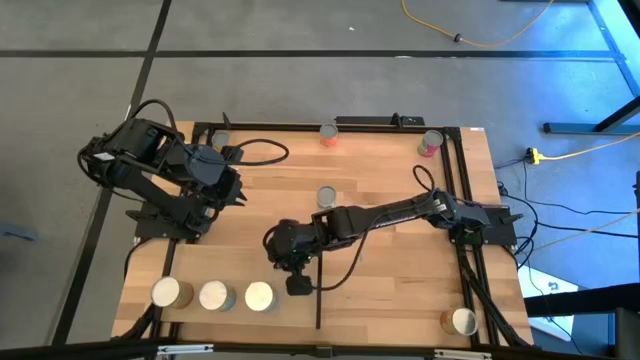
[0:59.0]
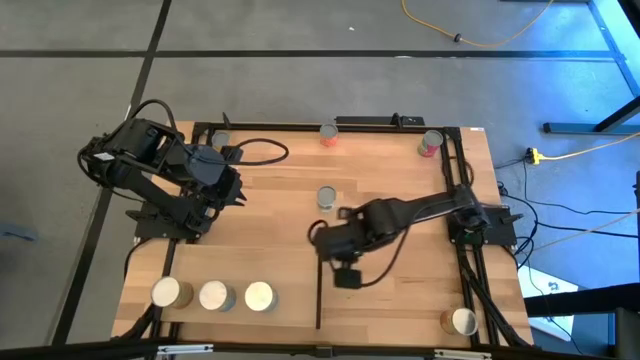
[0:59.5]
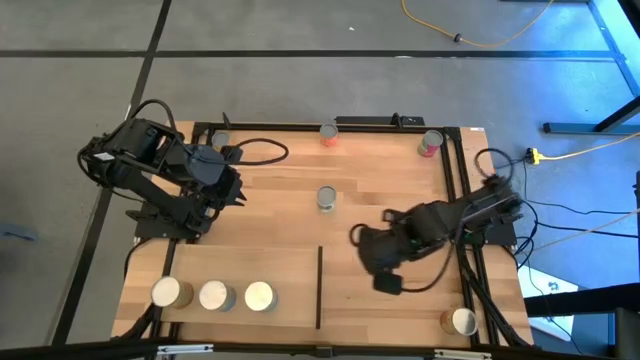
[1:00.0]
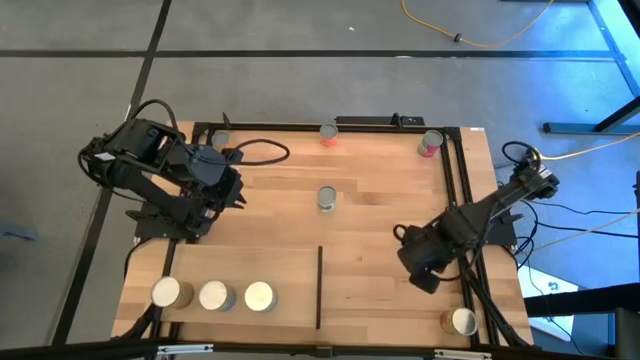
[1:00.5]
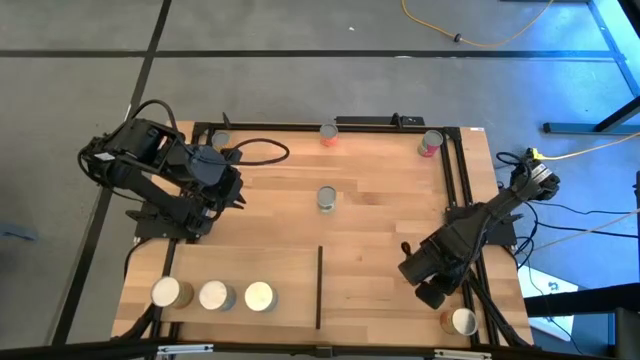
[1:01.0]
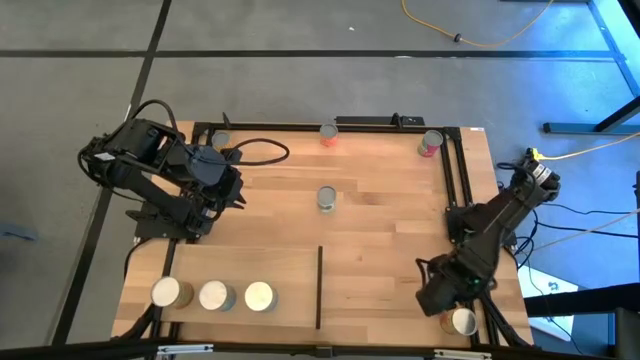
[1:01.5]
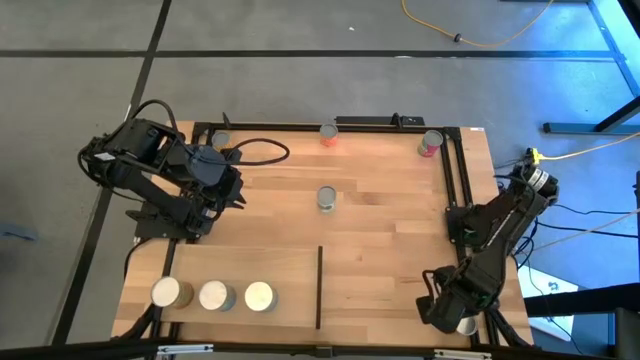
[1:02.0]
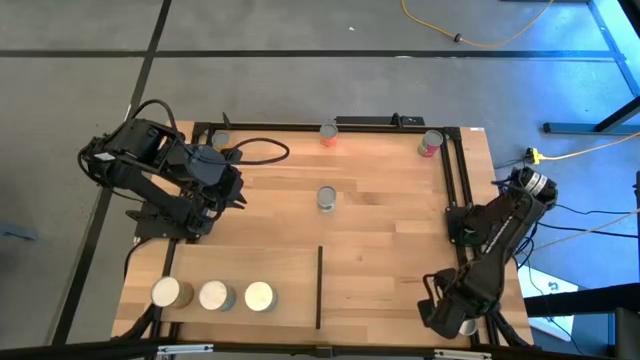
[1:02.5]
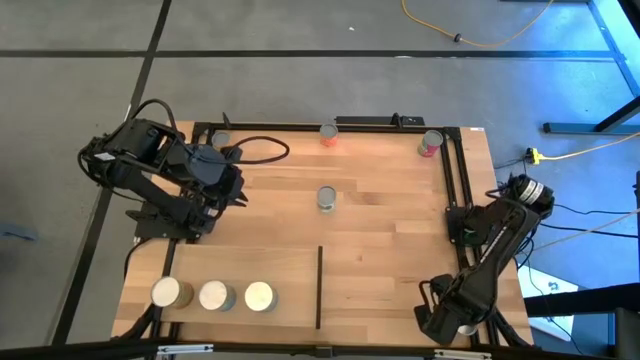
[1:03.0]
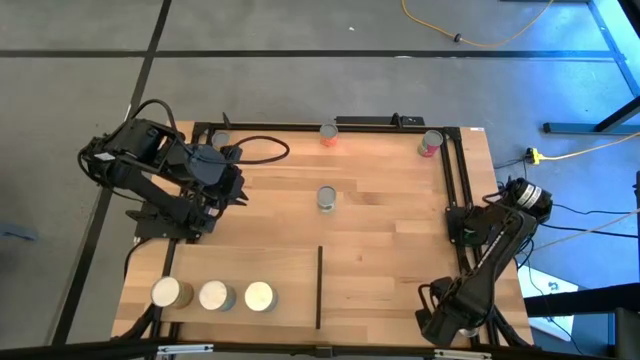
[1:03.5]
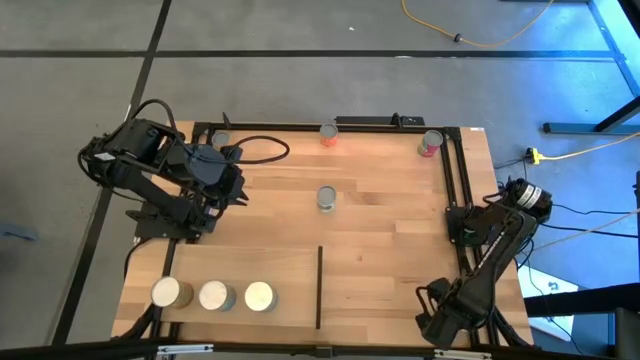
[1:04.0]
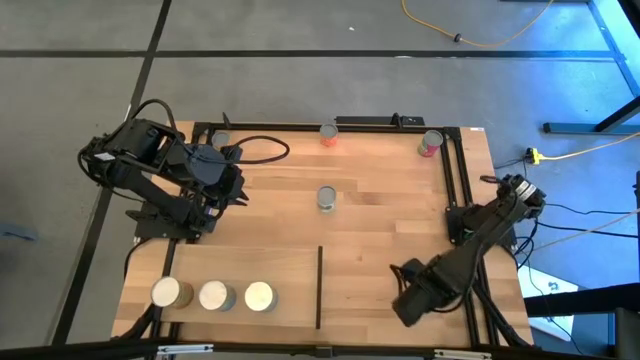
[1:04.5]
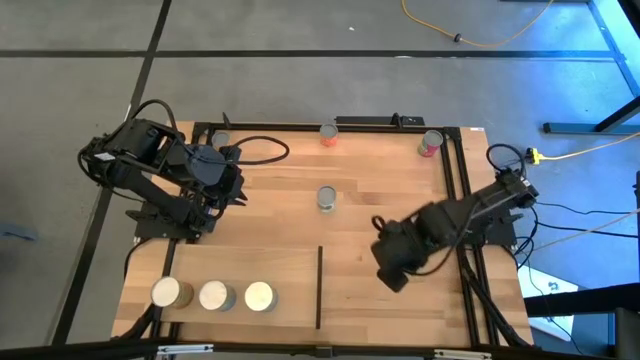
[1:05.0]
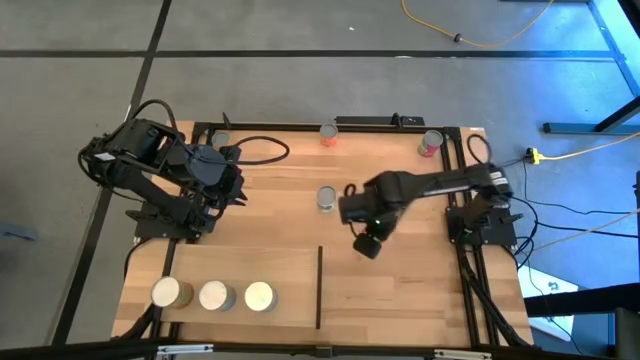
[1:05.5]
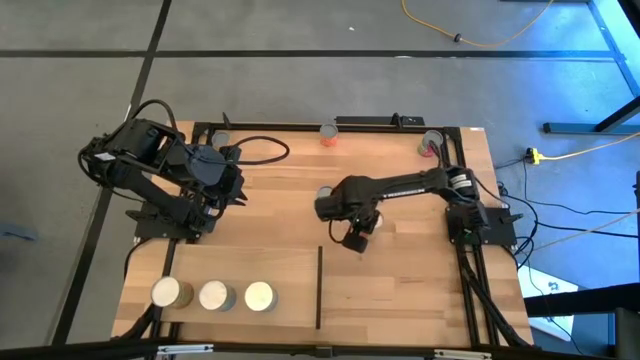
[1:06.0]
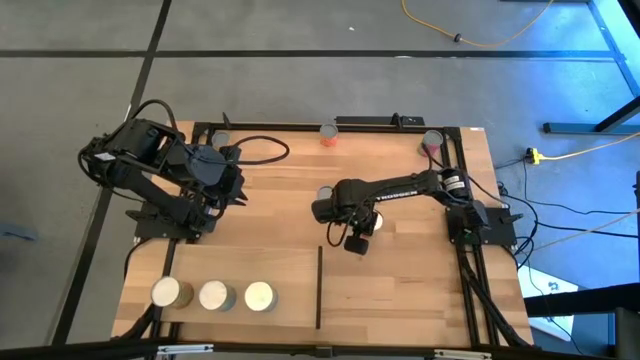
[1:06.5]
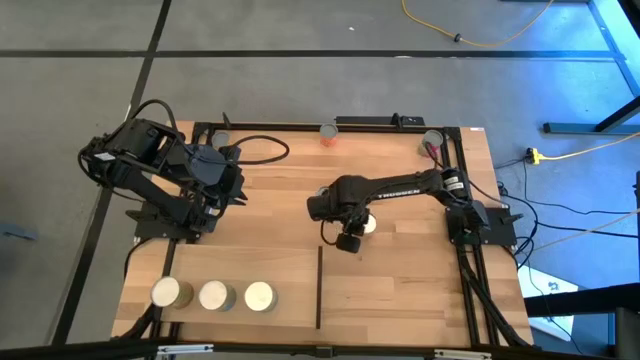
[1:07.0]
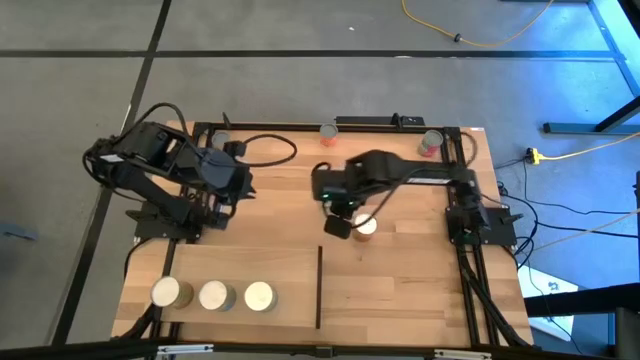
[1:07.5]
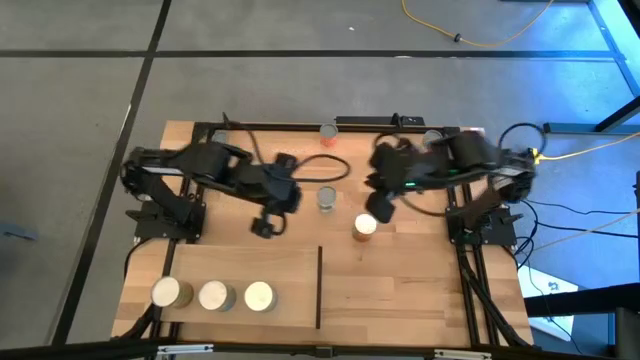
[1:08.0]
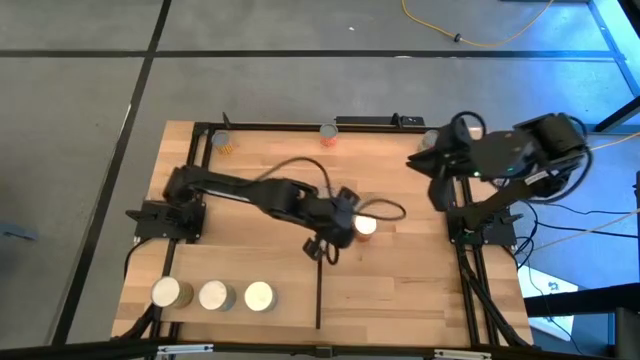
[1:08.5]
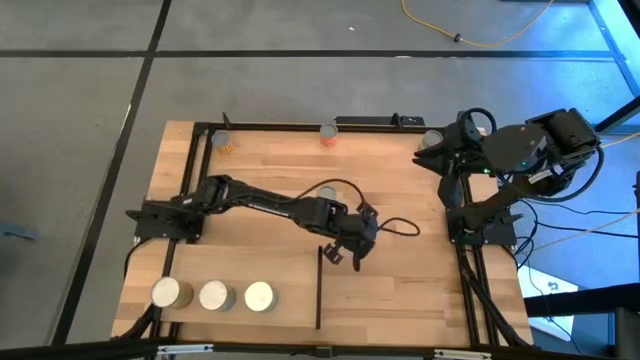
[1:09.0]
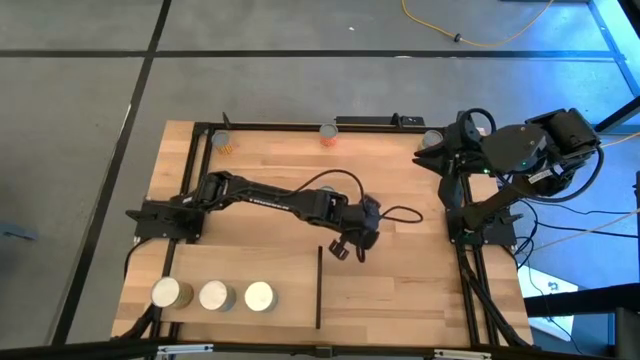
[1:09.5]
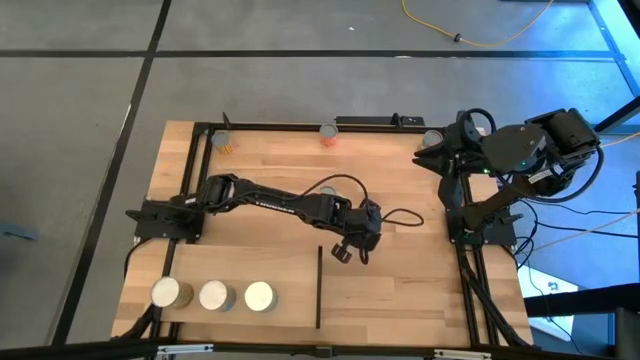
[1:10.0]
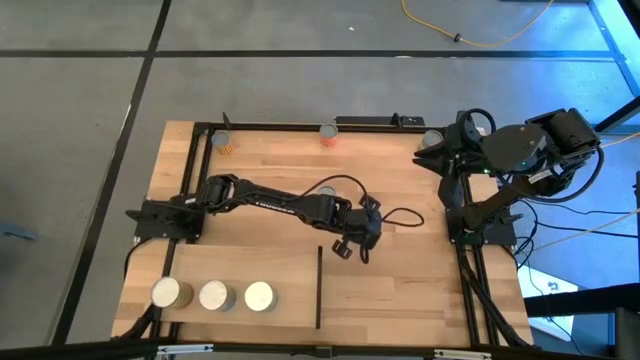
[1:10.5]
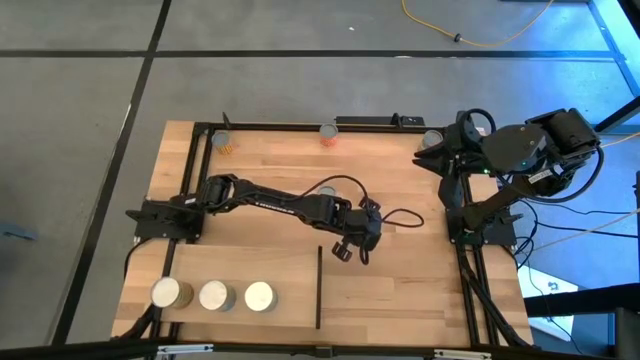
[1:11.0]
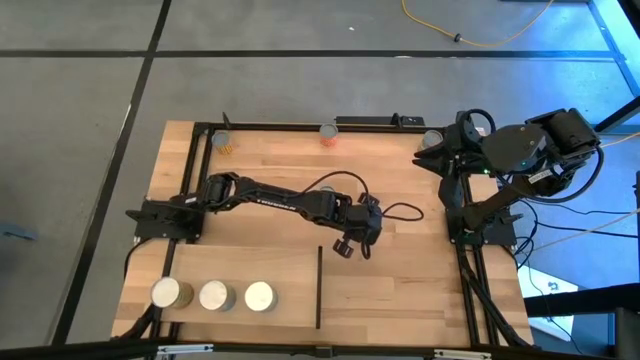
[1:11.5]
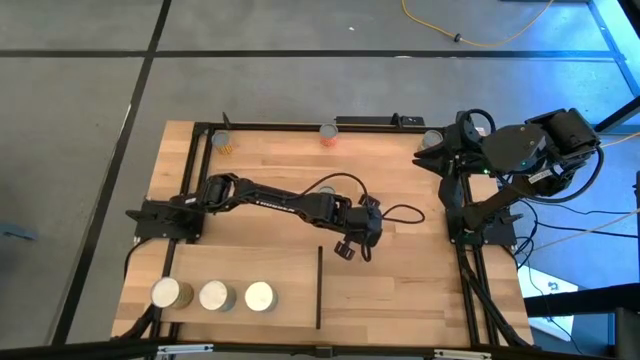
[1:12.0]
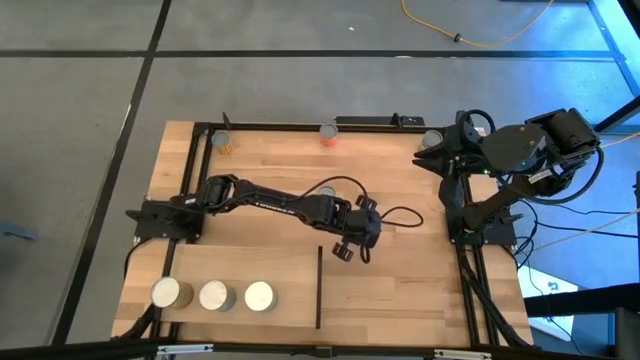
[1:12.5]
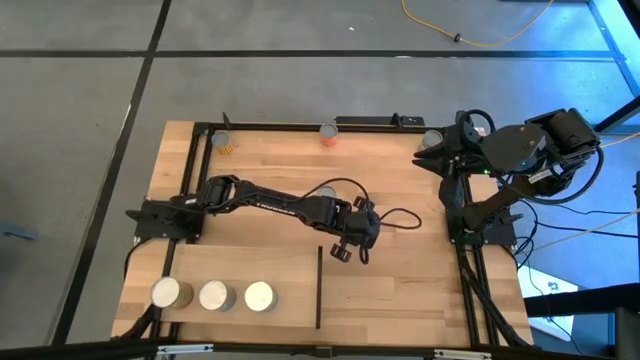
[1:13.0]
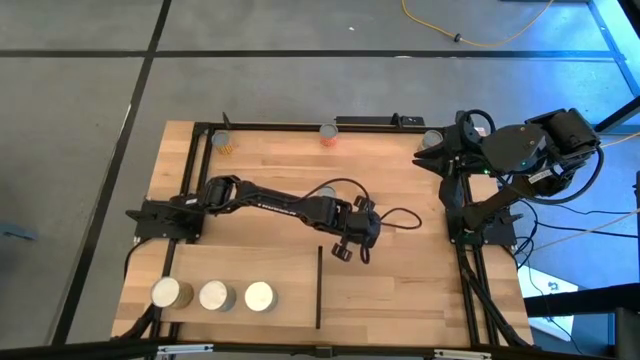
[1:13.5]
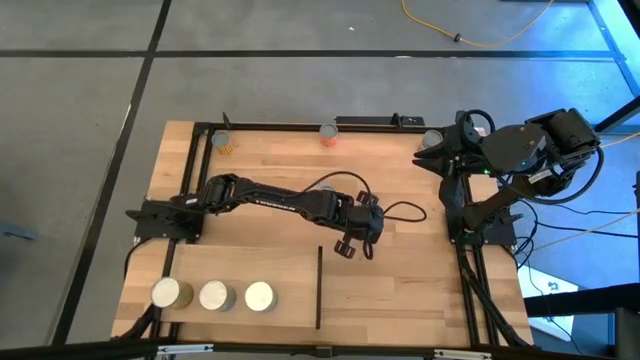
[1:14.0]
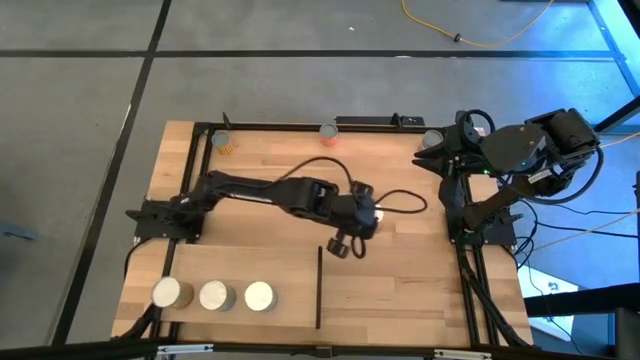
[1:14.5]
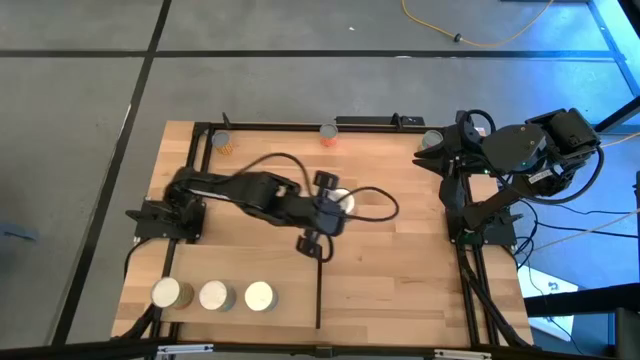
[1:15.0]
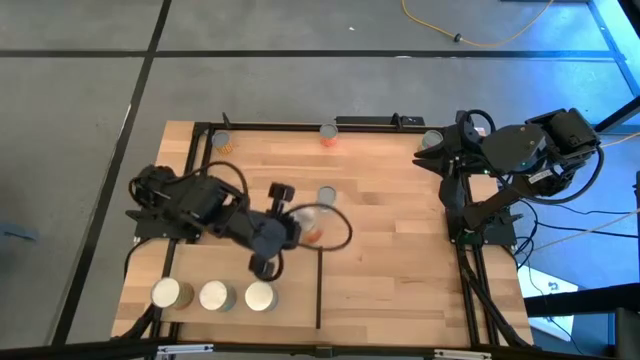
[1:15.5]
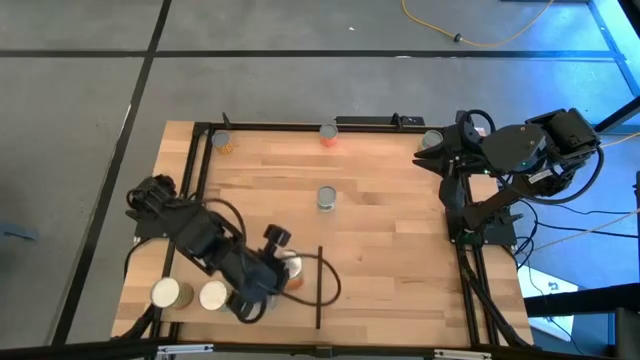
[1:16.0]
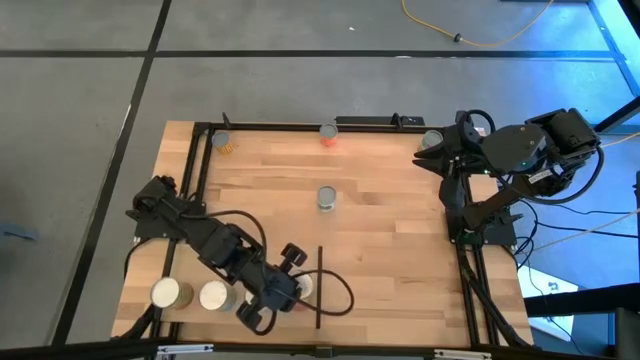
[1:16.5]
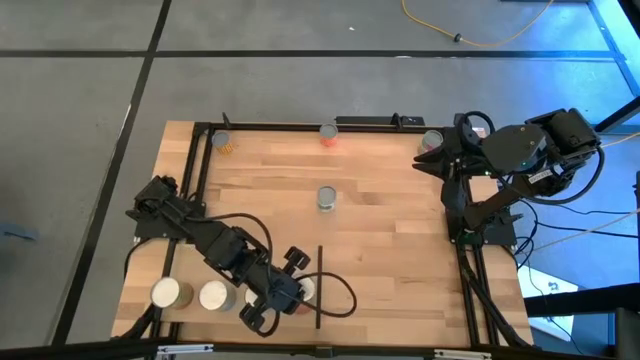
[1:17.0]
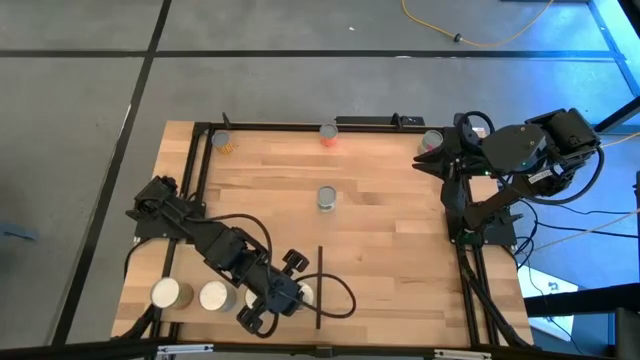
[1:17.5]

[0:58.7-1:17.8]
Task: Pick and place cans onto a shelf
Put the canned pineapple on the shelf

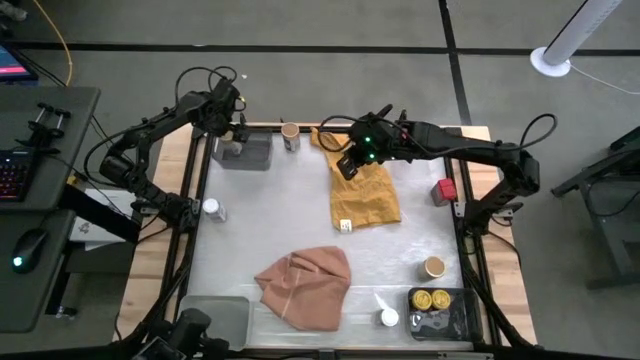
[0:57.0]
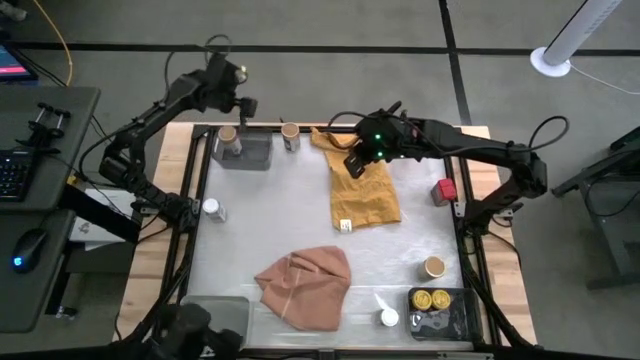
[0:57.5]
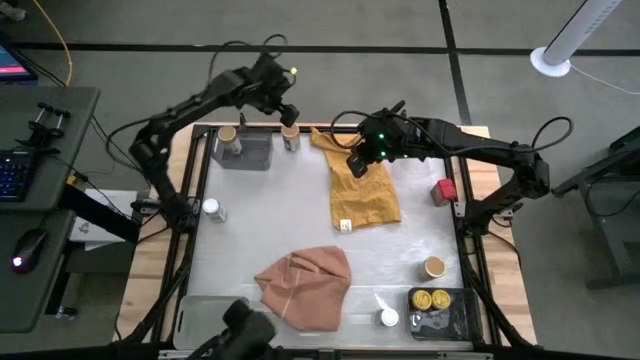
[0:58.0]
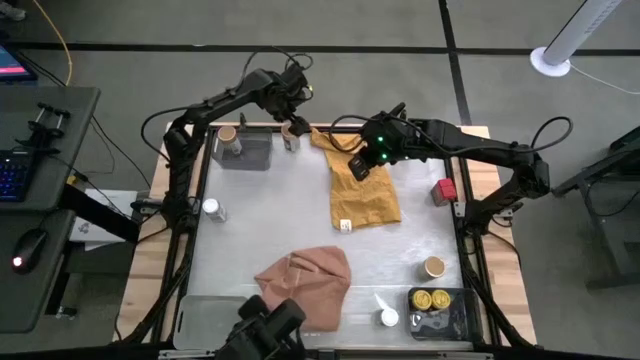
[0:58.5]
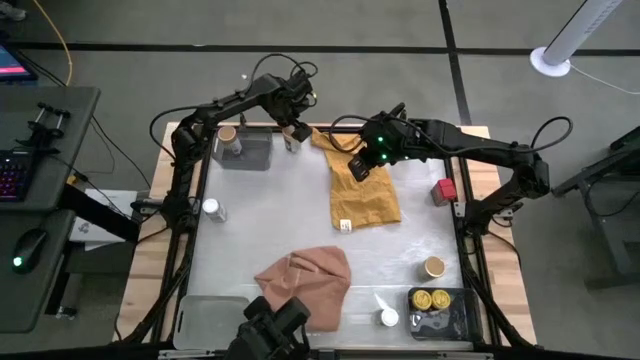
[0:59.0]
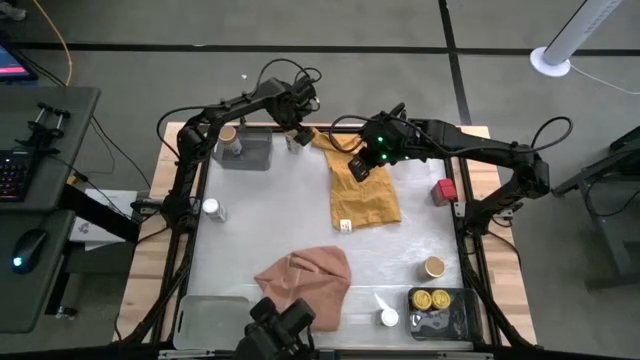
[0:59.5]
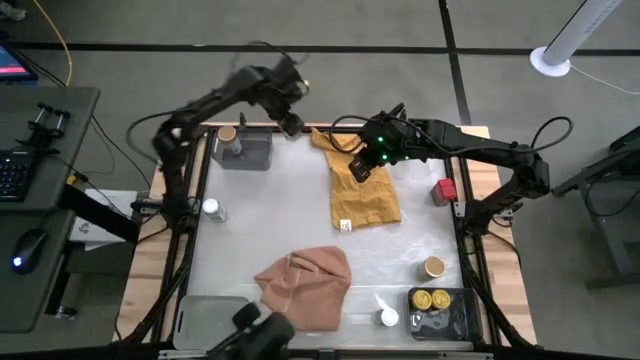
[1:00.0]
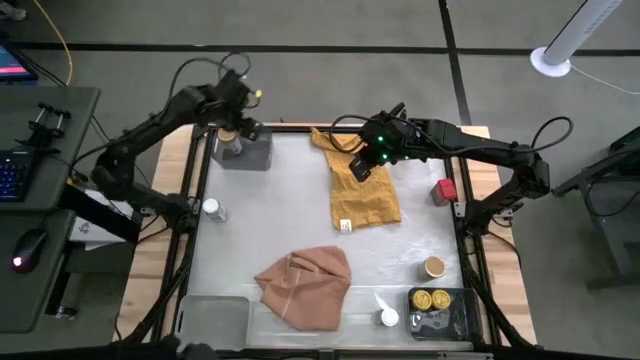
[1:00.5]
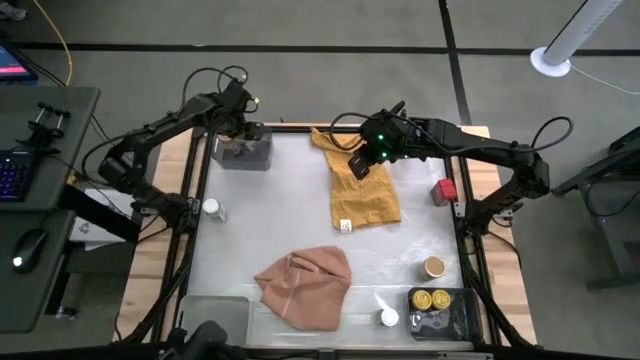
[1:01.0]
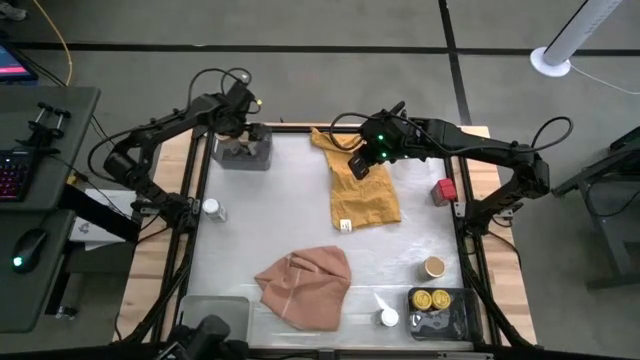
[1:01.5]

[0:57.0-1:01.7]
Task: Sort spices by type
Put the top brown seasoning bottle into the top left black bin
